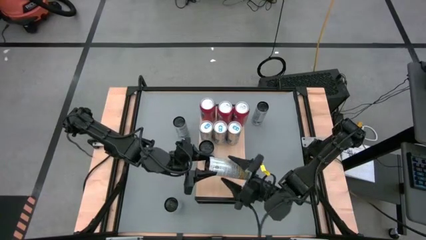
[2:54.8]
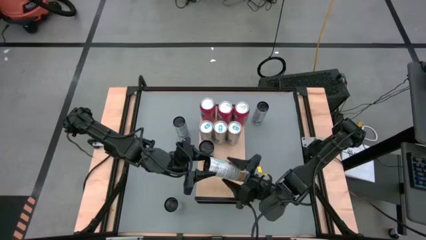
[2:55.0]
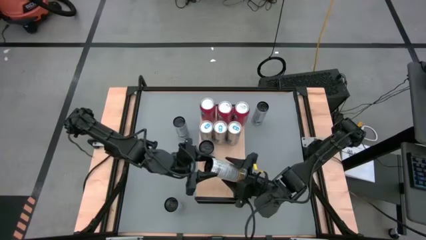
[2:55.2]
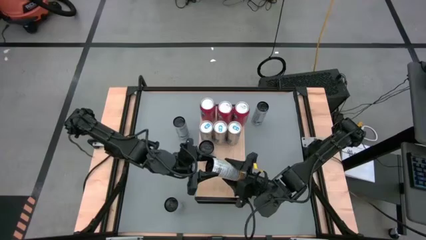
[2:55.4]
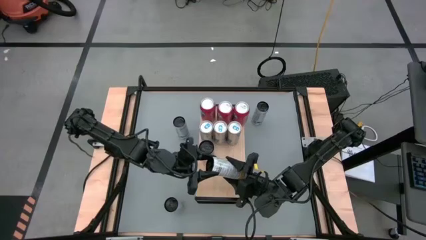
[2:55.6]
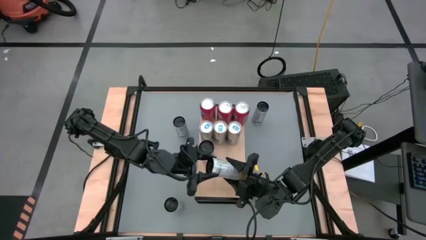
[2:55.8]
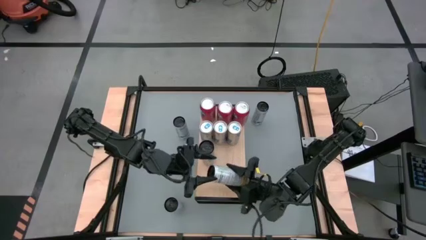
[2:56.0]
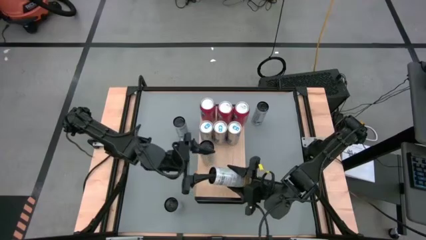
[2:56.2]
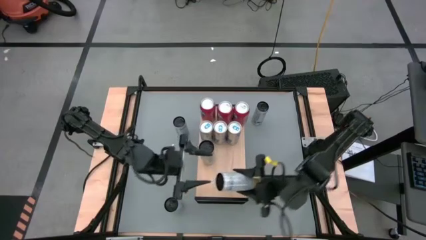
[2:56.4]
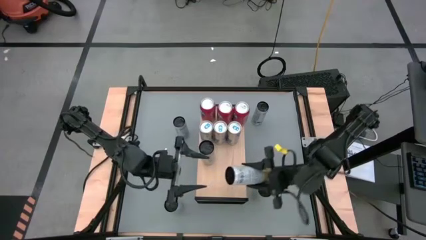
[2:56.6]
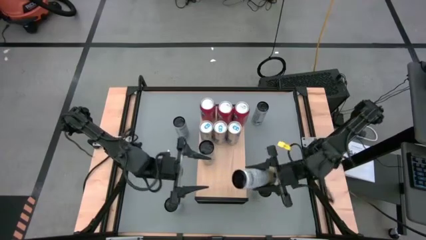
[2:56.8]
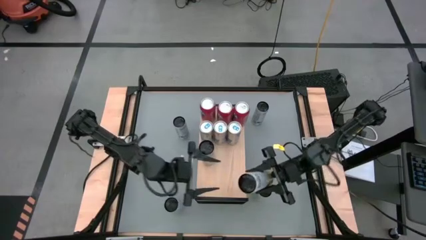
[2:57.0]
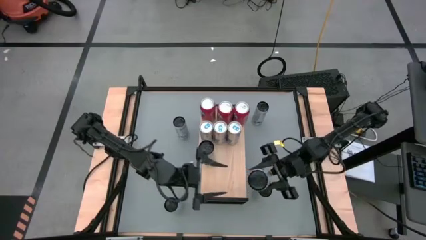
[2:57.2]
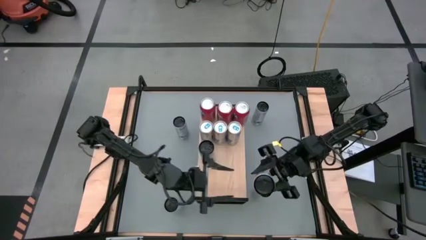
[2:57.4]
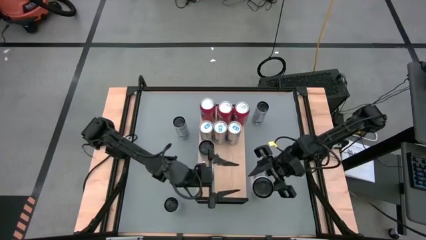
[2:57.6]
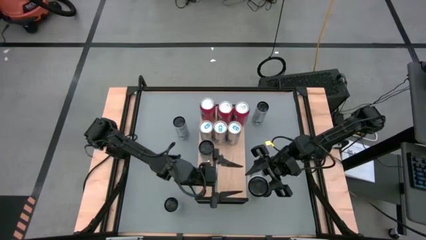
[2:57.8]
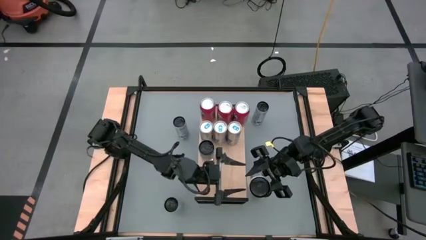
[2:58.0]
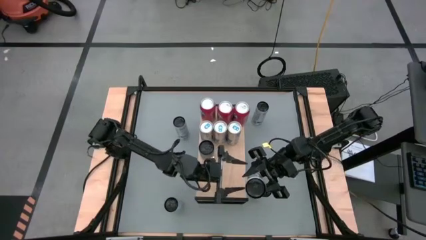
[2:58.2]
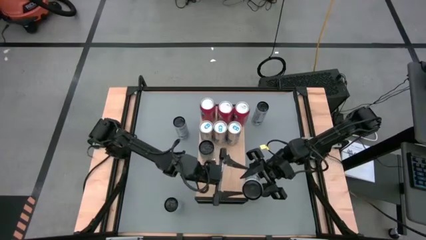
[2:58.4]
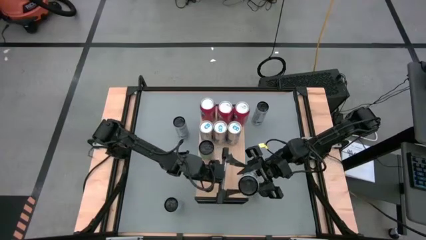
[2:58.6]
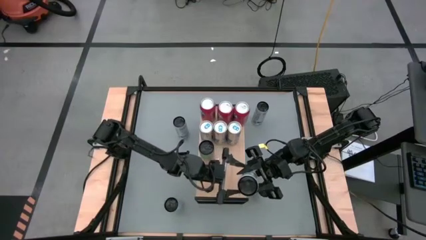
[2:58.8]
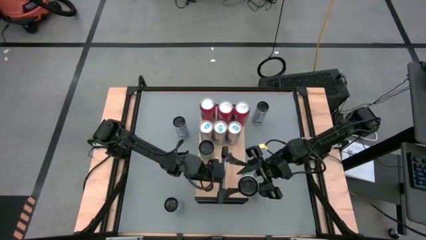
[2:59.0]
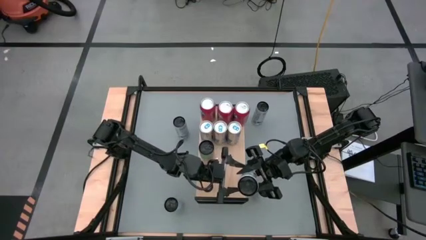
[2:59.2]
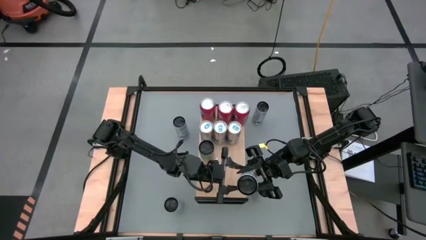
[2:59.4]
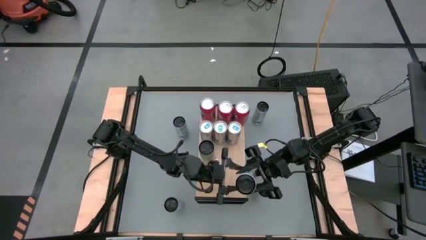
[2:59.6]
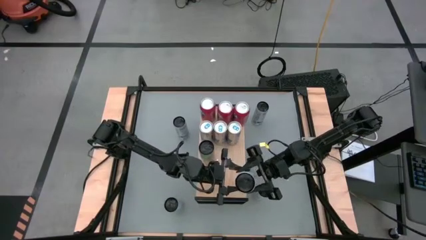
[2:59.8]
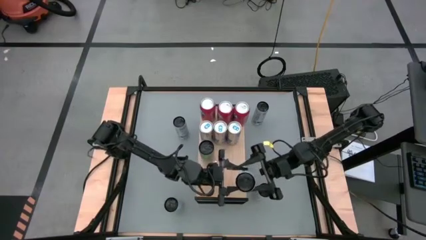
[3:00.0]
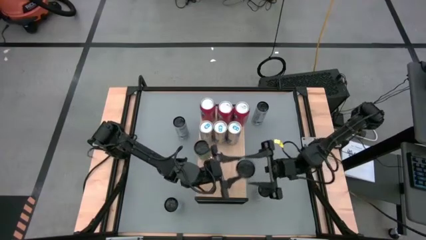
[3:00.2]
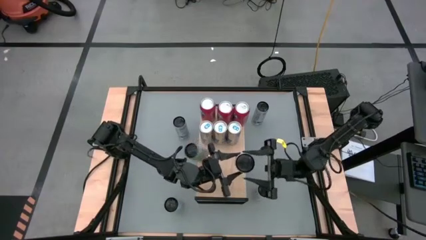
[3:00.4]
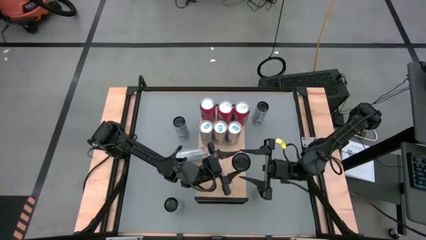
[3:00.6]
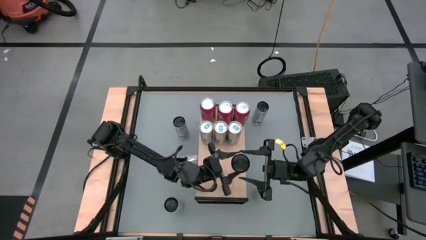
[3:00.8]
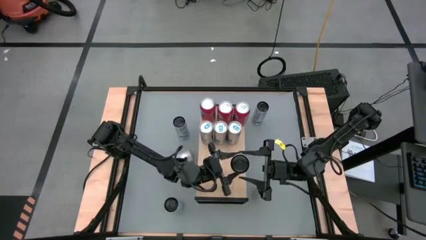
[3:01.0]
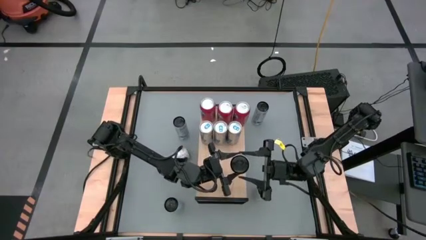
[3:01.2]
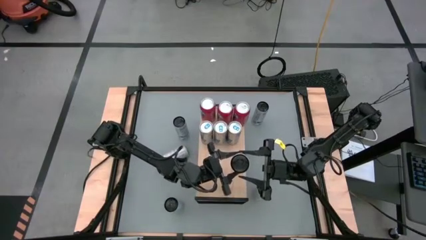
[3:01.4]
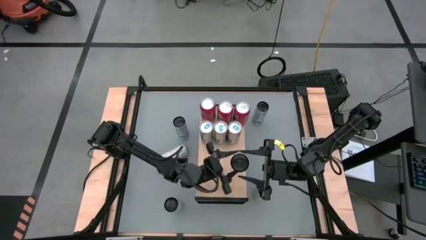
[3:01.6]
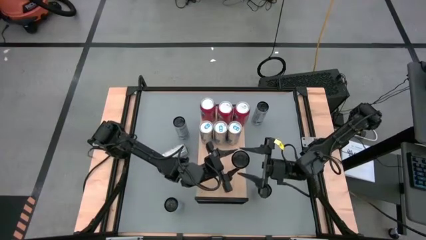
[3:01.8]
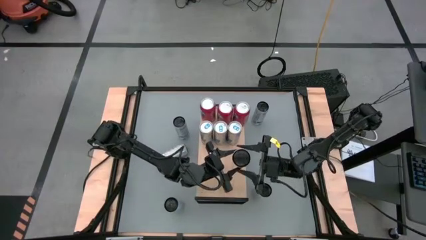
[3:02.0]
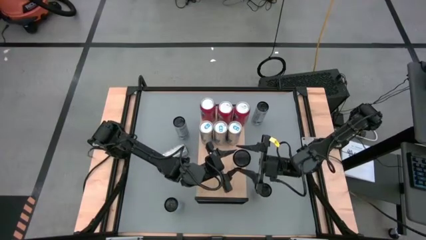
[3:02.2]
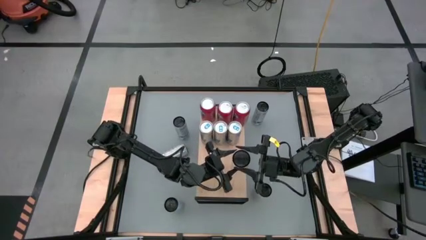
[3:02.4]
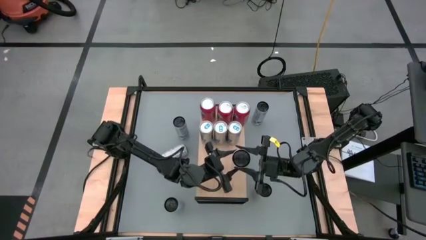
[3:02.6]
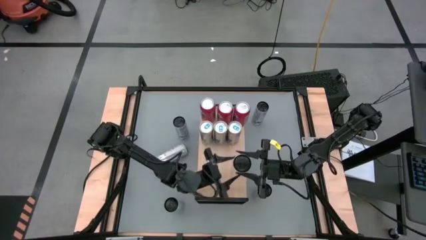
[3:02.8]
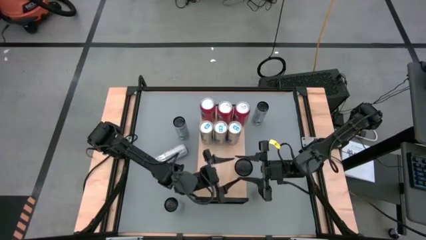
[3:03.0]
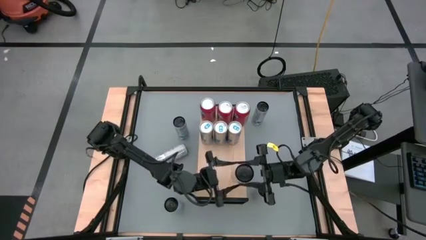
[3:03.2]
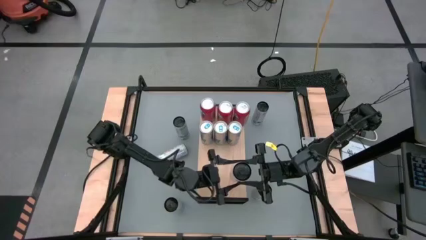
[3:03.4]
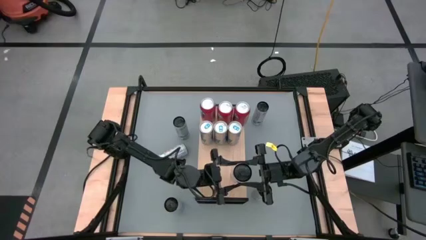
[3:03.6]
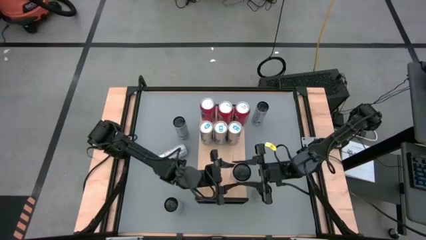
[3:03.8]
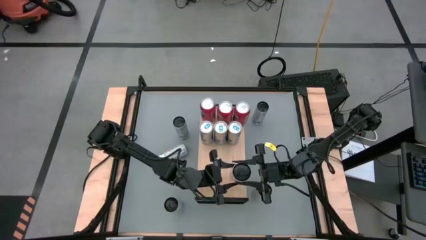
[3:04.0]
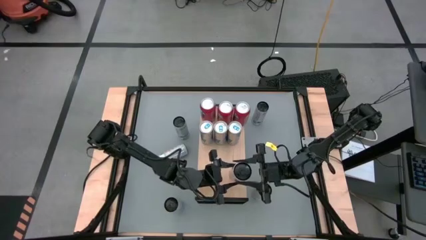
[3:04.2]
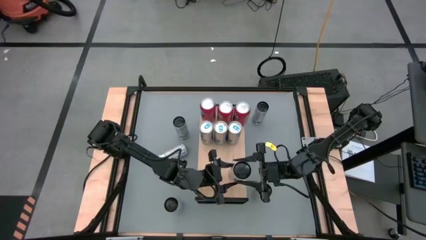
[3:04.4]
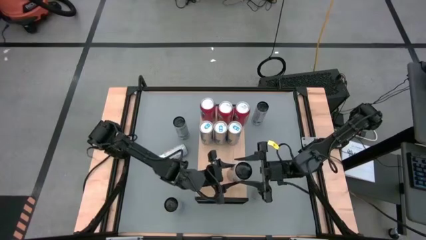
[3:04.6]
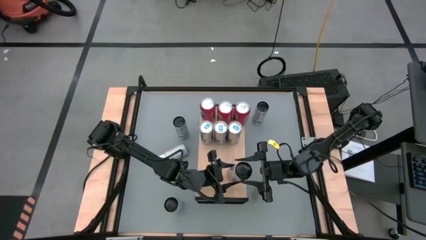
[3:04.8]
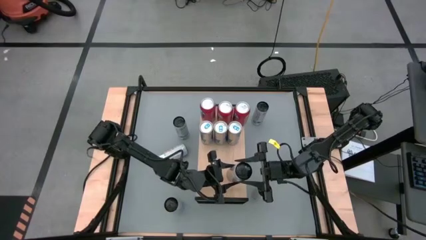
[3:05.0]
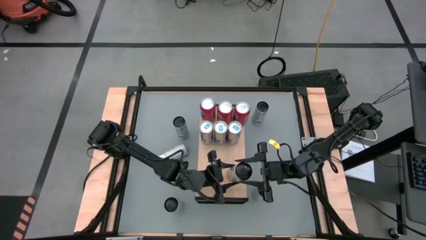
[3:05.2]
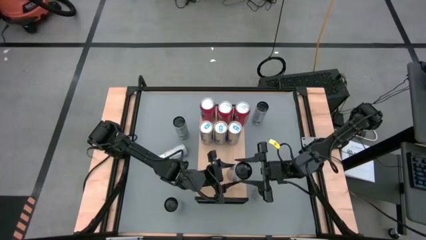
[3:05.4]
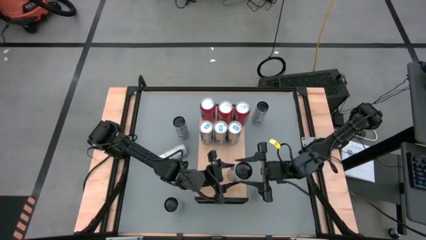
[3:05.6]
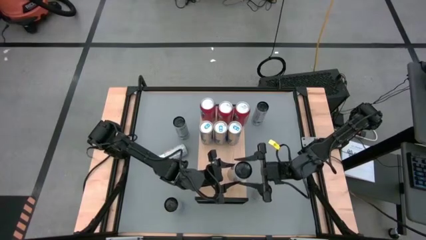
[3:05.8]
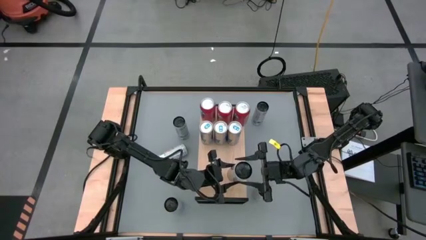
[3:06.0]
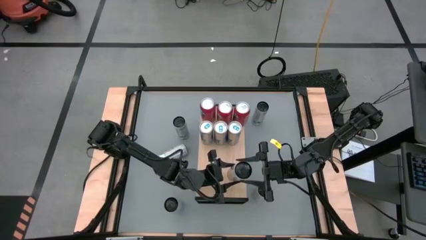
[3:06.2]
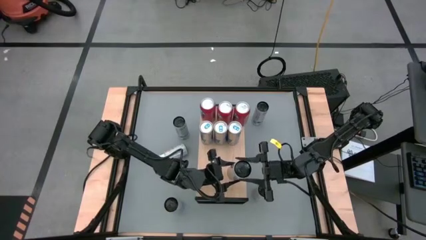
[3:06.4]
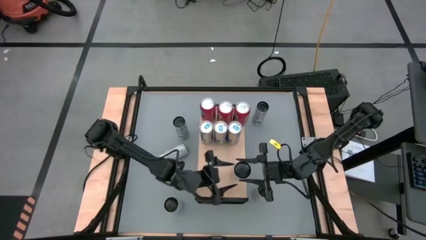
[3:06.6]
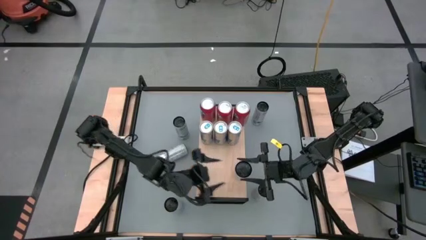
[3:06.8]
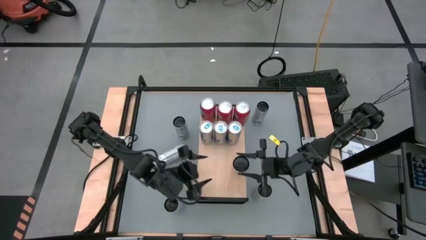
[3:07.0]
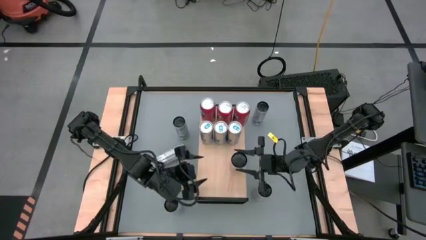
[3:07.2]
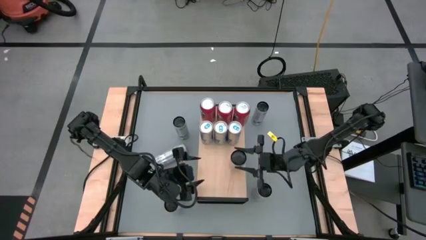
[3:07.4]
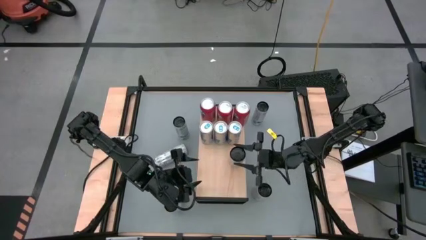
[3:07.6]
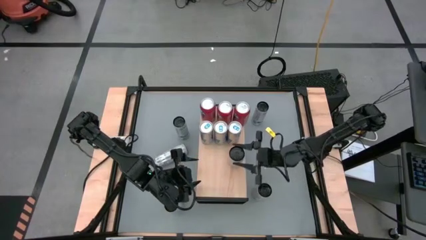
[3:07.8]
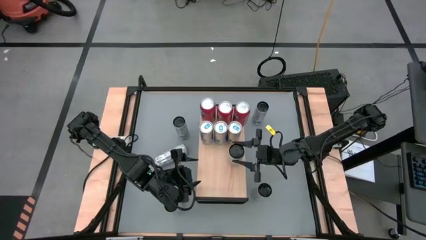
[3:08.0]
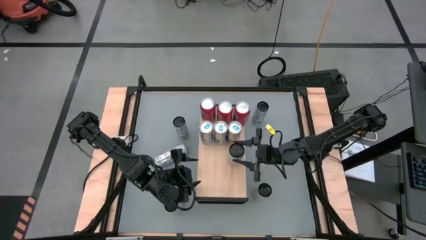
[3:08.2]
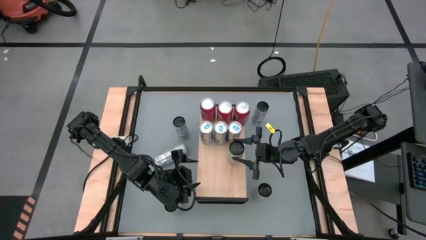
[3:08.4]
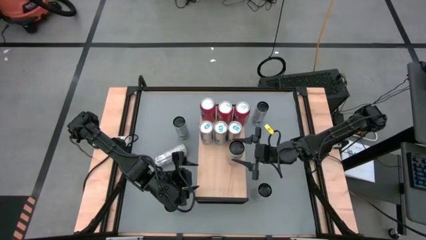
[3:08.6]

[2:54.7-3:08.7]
Task: Place canned beverage on shelf
Put the top left white soda can on the shelf aligned with the other blue soda can
